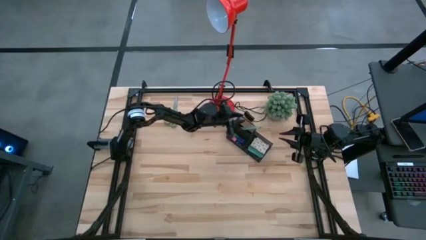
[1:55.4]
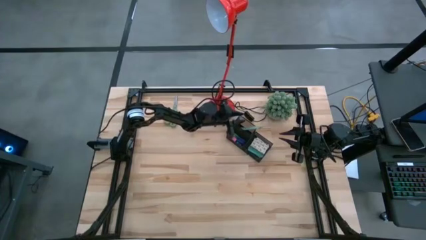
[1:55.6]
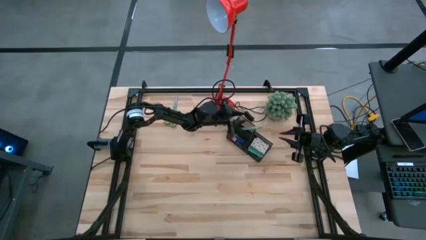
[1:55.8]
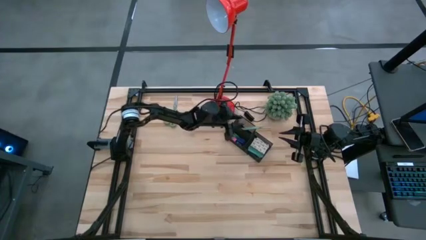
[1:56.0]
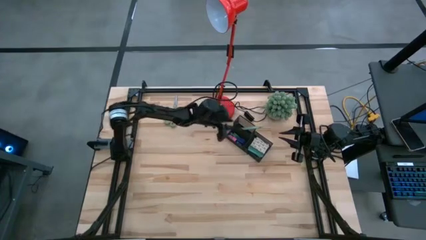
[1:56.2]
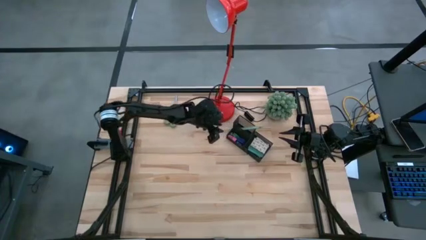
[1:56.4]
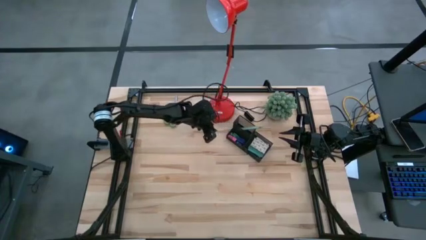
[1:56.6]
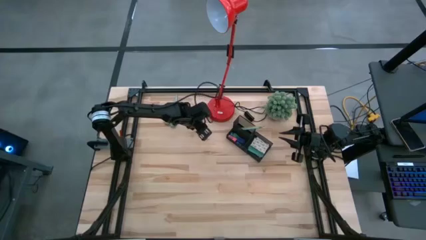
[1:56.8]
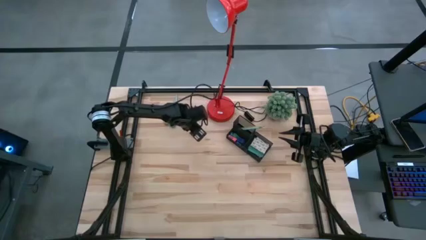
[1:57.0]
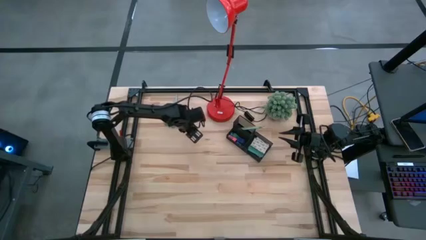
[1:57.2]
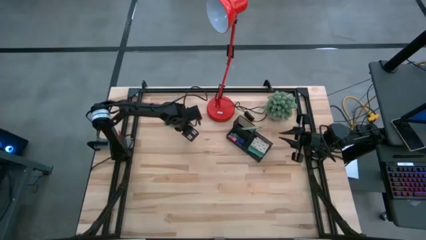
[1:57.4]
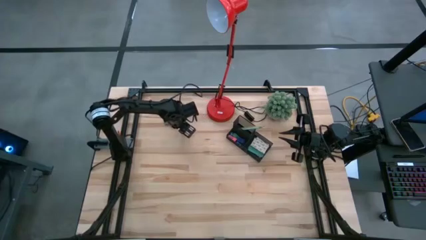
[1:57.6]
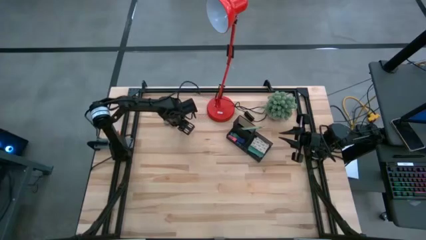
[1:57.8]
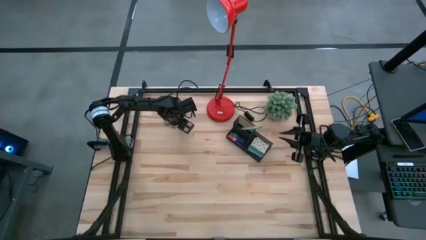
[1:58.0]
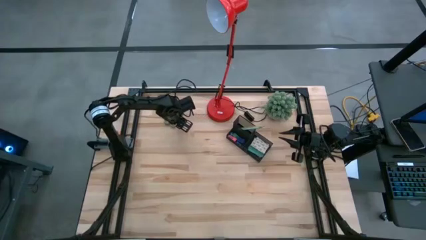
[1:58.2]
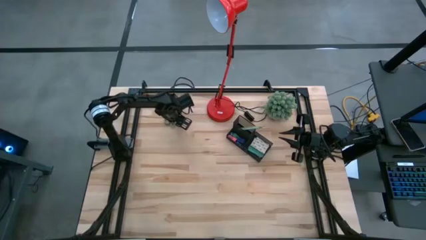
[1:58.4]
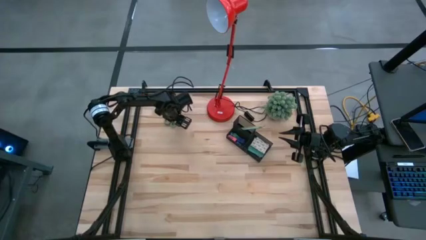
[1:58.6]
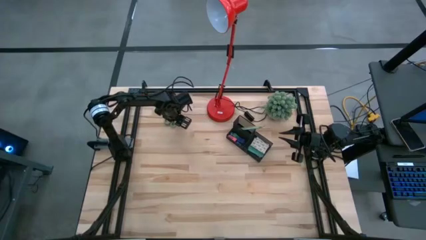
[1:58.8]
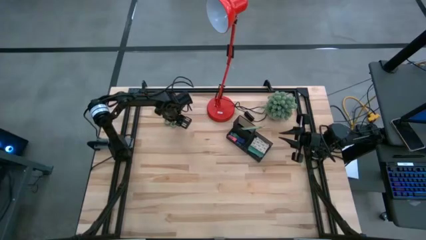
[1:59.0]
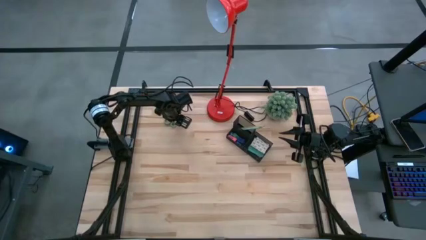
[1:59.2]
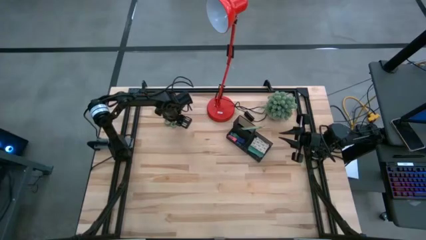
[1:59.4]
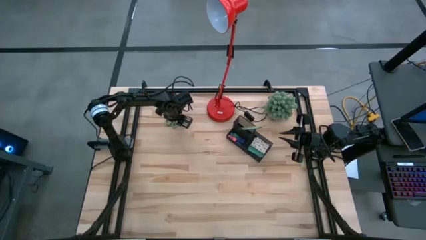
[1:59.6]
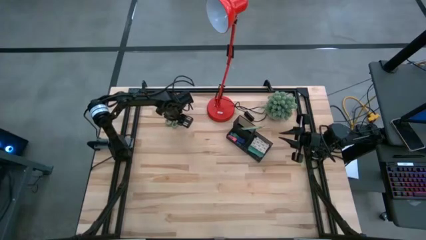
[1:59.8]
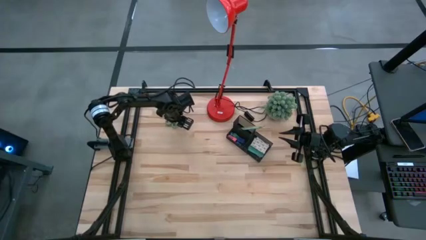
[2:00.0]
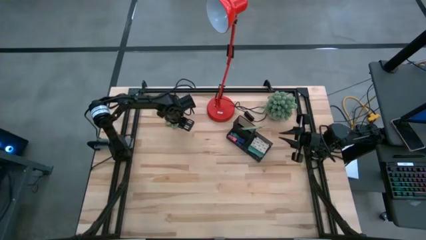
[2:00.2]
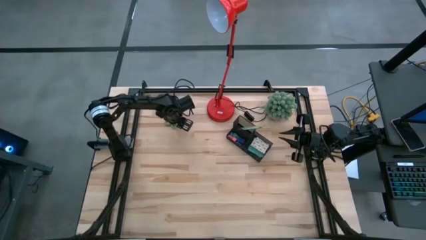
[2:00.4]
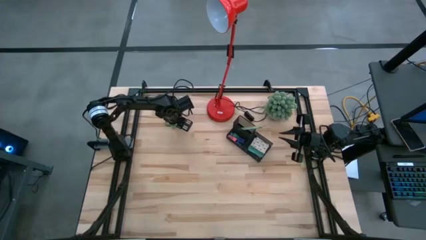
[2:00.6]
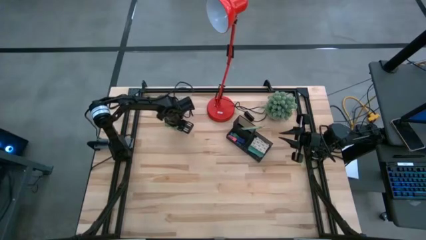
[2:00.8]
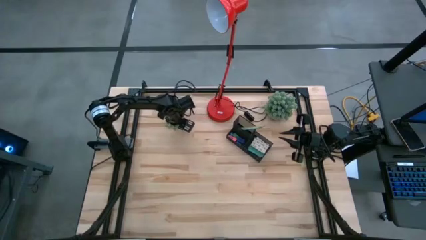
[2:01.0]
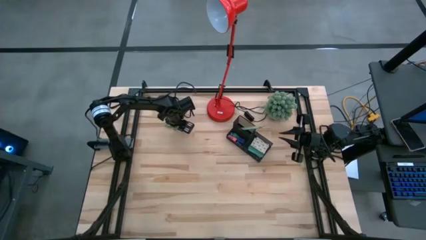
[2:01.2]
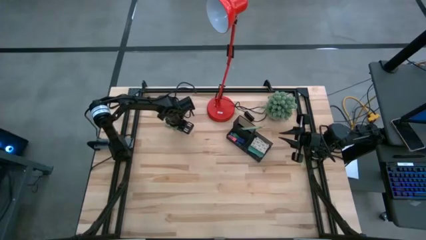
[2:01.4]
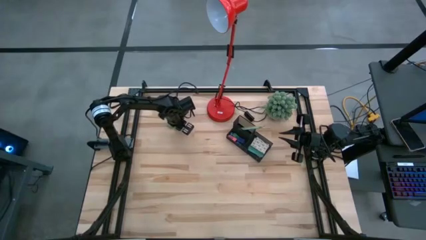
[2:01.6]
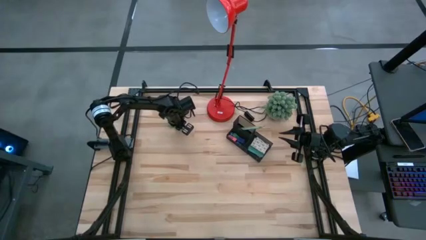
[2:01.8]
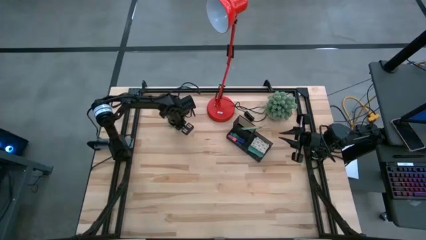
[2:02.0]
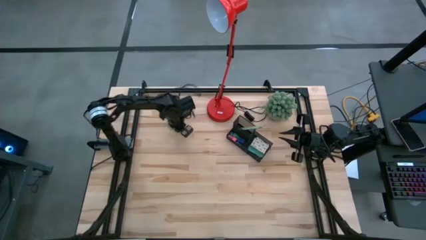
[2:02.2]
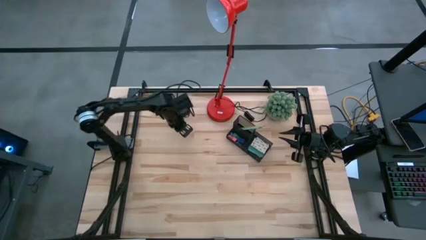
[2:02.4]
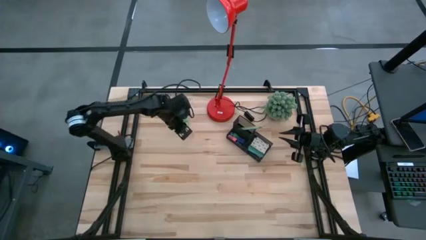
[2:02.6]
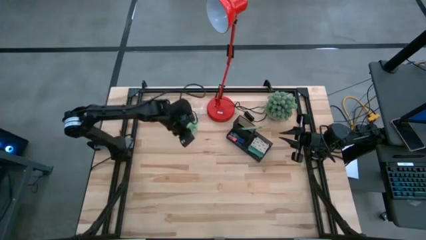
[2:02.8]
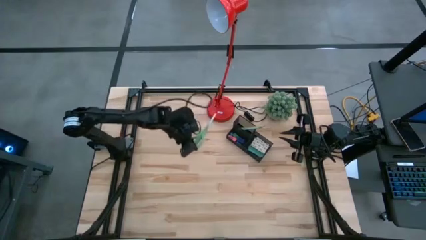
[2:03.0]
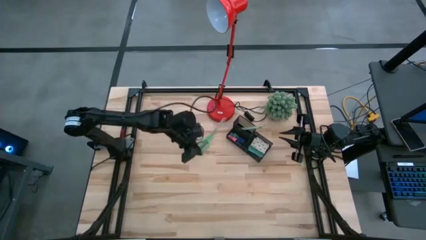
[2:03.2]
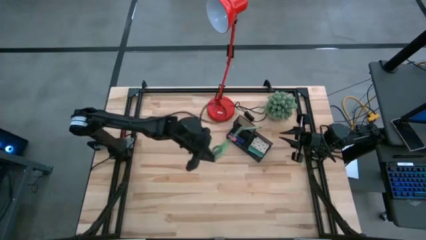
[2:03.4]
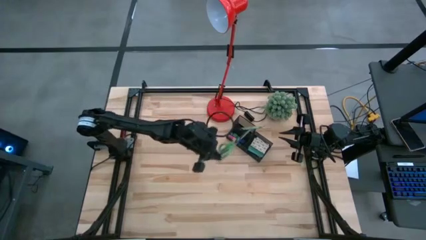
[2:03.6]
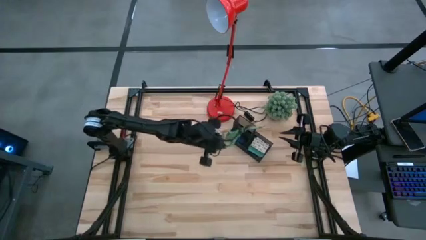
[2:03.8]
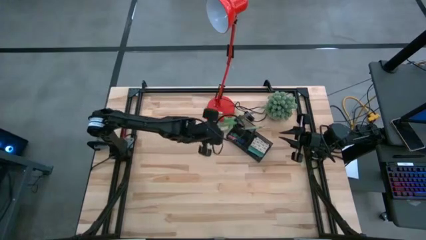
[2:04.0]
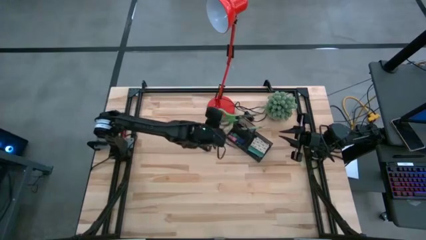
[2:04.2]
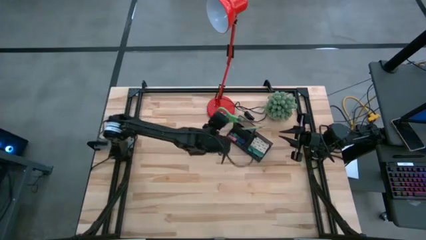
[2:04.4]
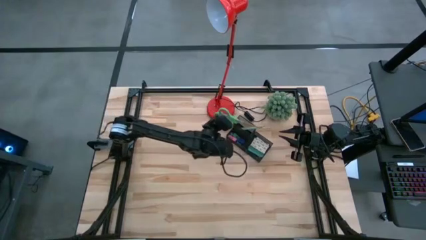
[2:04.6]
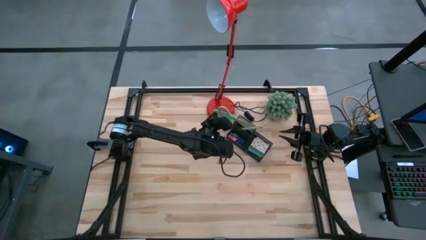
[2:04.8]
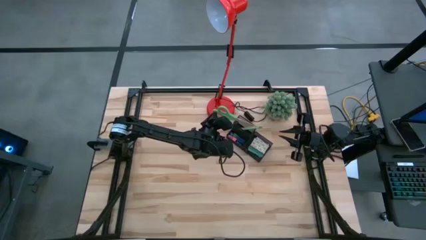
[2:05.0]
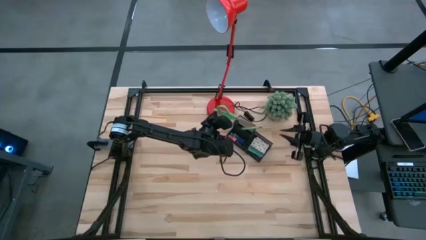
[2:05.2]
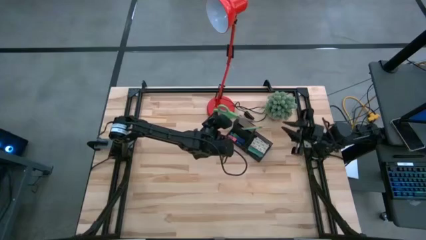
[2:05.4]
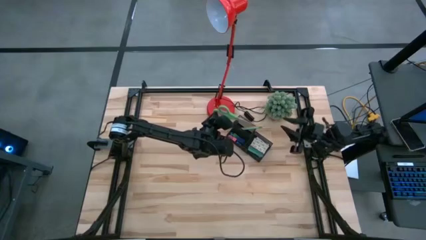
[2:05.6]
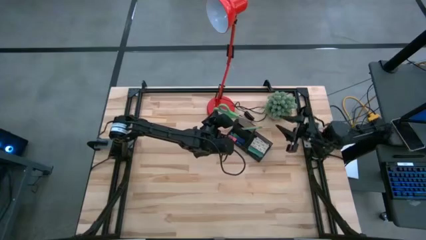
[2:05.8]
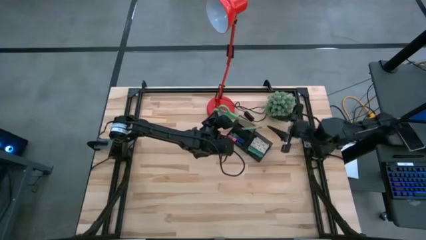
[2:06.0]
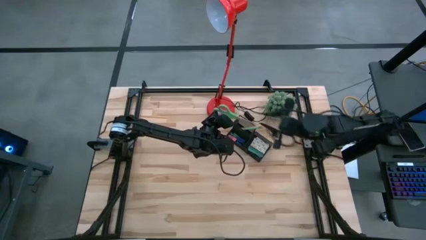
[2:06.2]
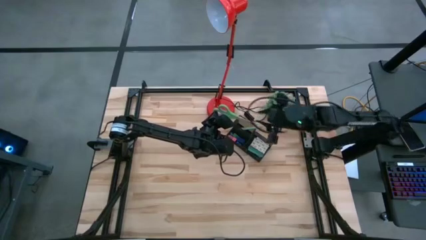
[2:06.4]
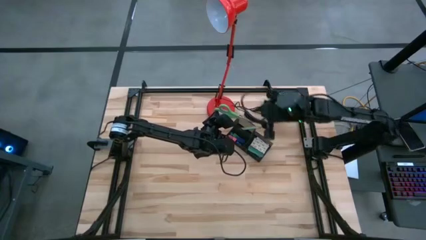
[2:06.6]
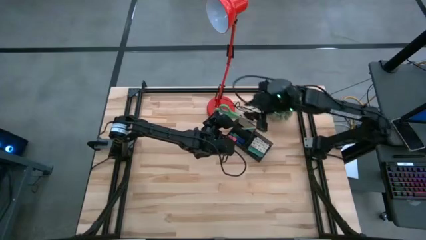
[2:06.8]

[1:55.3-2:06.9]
Task: Pick and place office supplies into organizer
Put the scissors into the desk organizer

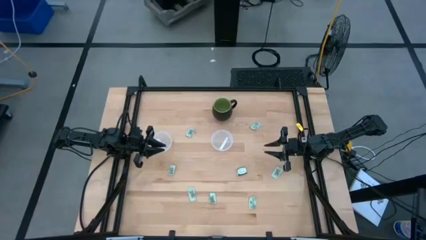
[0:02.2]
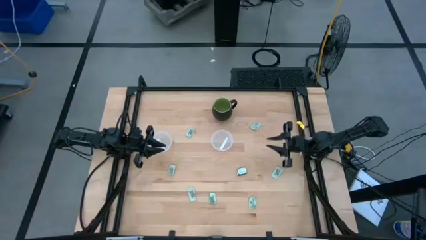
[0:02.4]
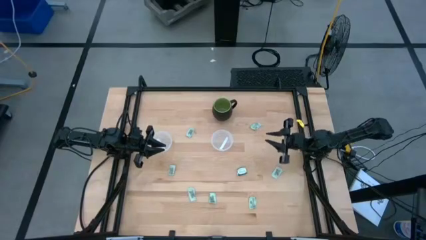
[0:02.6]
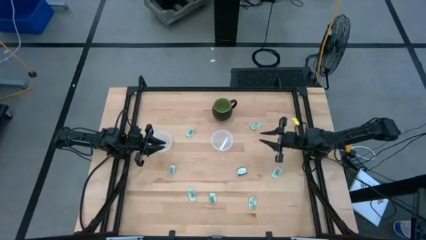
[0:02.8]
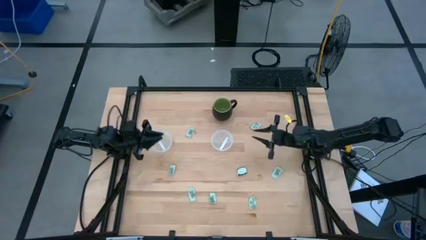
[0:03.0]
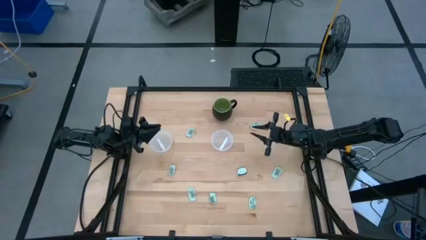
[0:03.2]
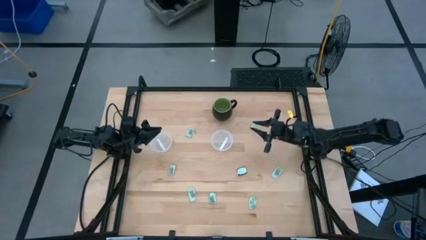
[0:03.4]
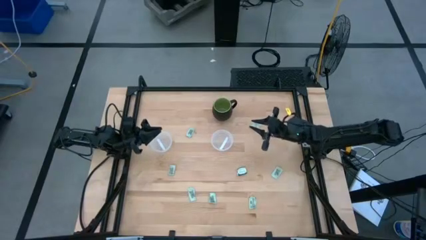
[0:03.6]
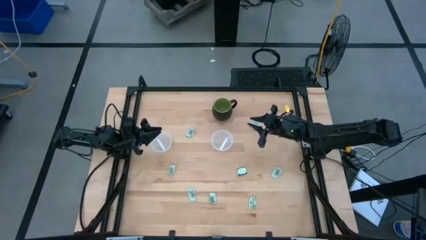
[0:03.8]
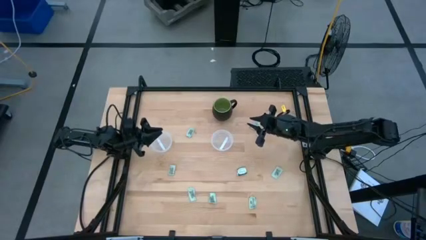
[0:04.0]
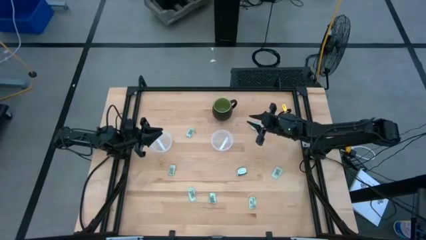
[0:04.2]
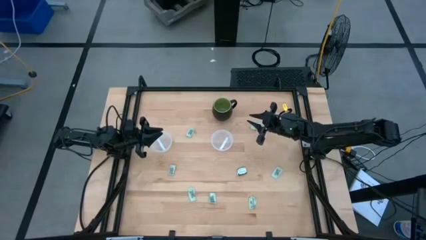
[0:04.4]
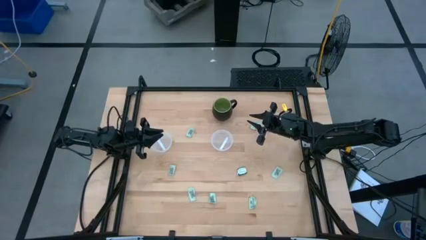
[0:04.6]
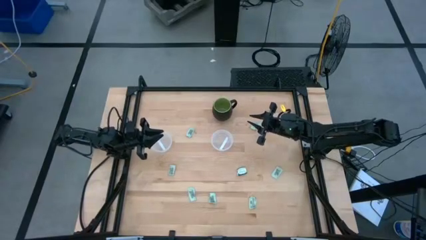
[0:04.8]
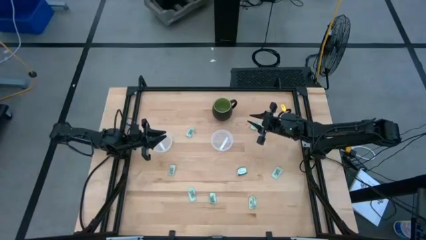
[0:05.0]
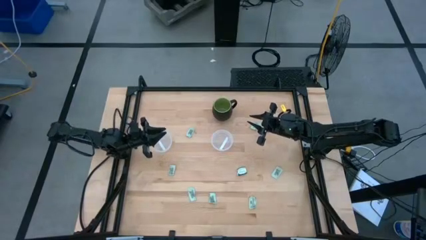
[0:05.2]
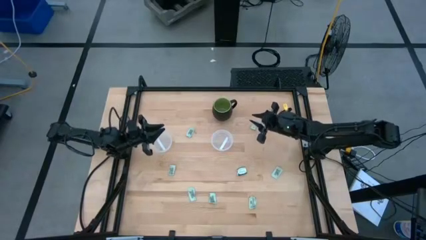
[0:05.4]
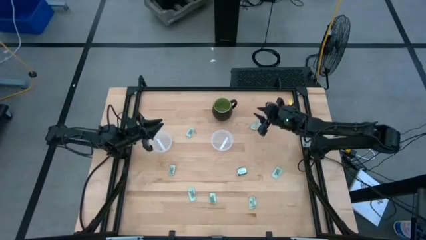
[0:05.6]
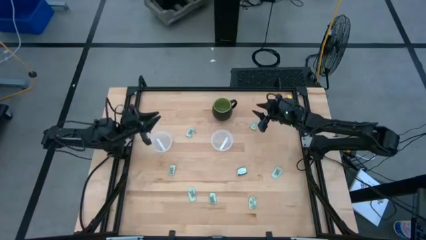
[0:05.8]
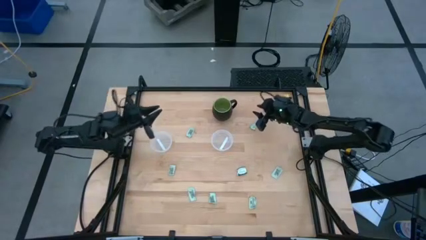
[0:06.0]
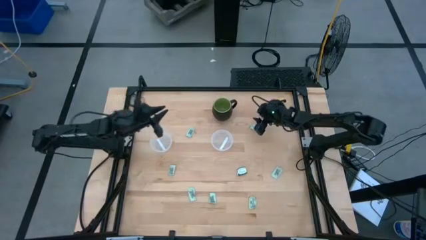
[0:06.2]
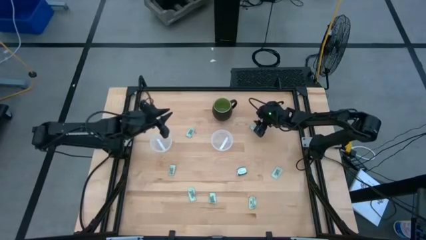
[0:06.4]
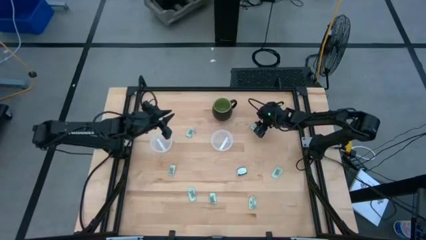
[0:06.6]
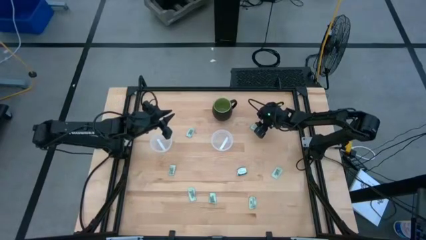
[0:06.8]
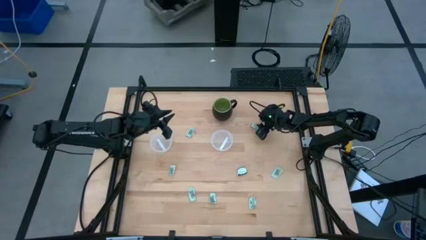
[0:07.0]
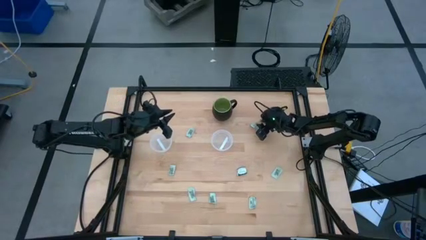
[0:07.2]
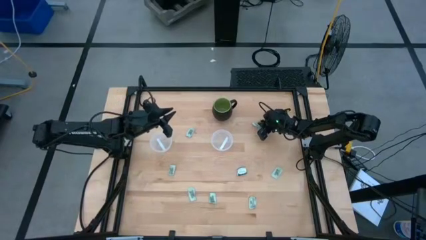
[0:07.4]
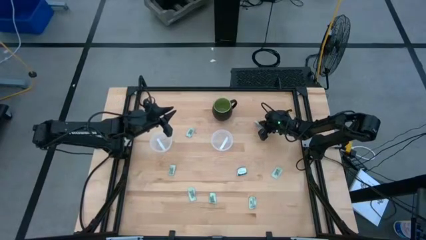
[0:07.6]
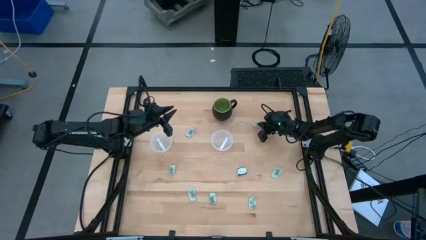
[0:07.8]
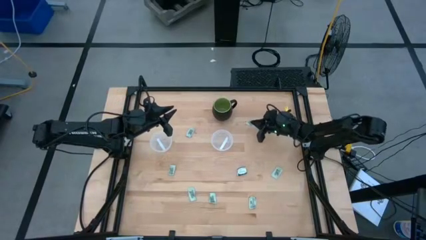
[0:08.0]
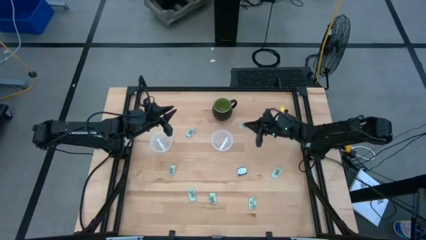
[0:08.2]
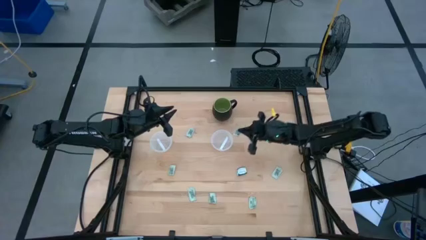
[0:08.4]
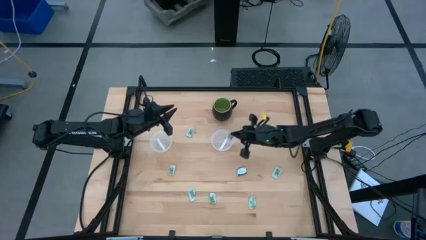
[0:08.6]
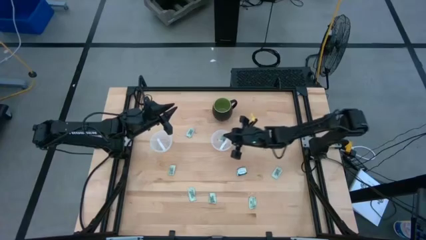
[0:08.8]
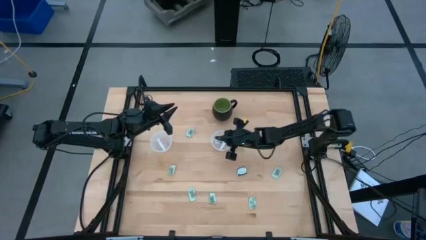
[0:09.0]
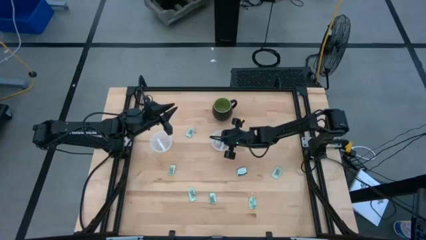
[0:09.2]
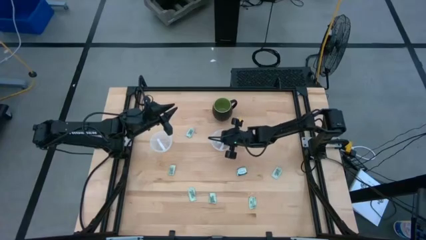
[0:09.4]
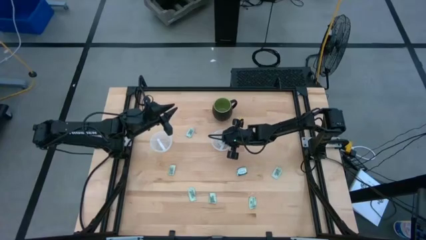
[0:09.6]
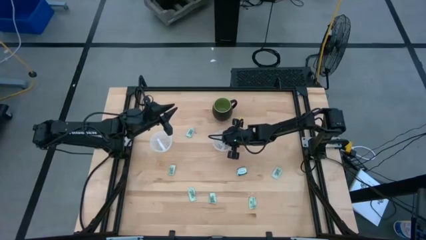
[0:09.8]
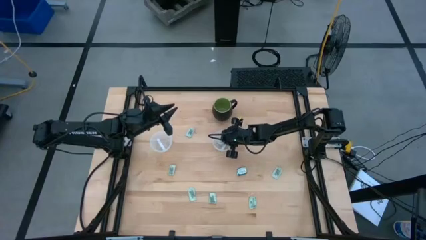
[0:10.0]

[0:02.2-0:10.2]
Task: Pick and place Stevia / Truvia into bins
Put the white stevia packet into the right transparent container
